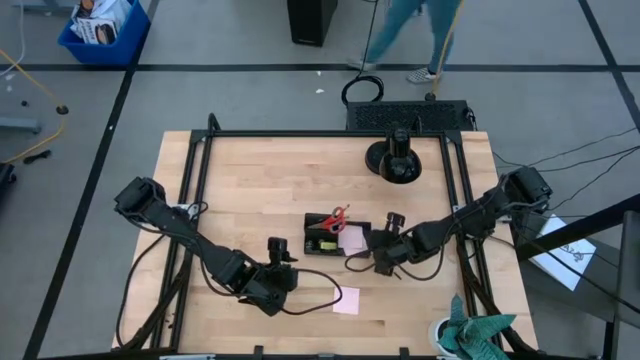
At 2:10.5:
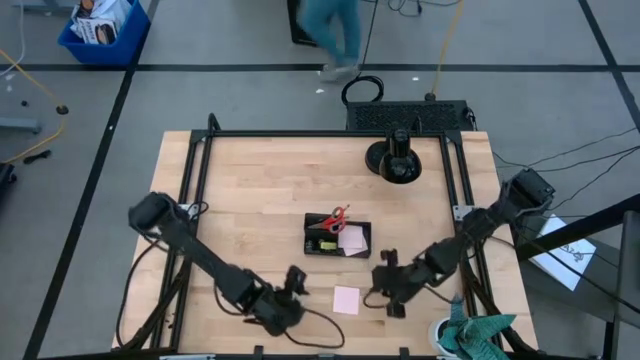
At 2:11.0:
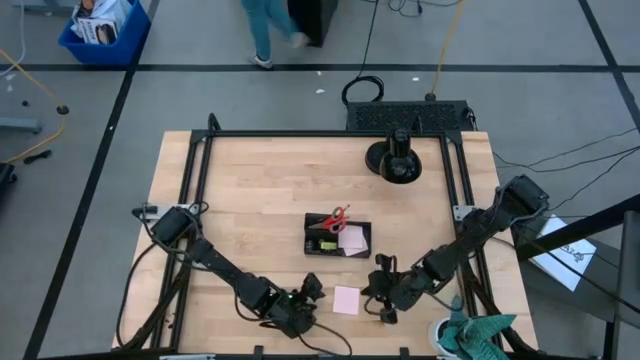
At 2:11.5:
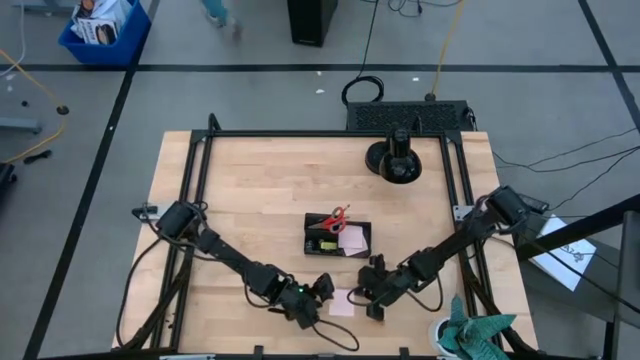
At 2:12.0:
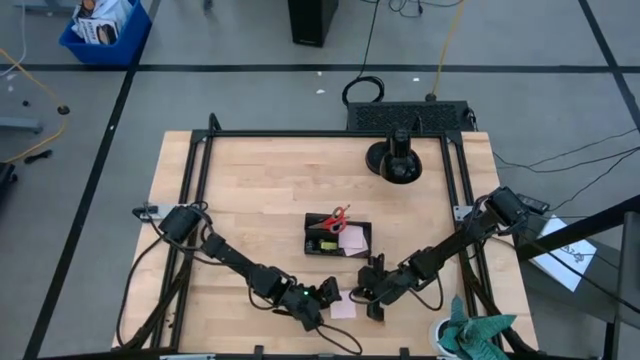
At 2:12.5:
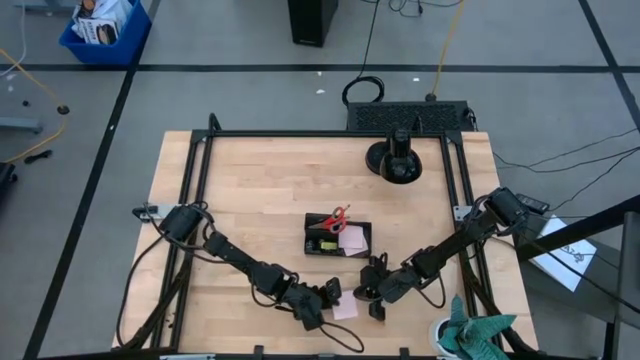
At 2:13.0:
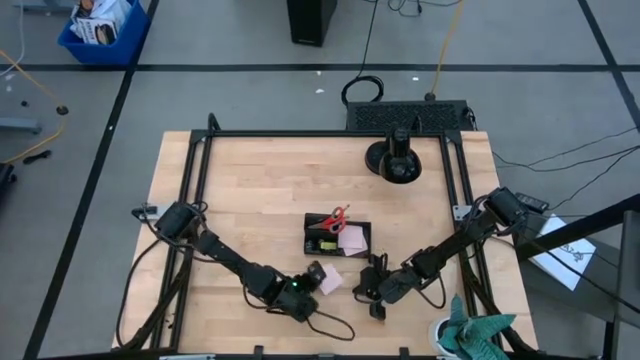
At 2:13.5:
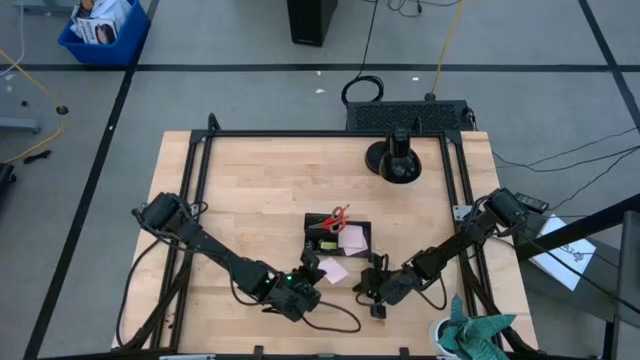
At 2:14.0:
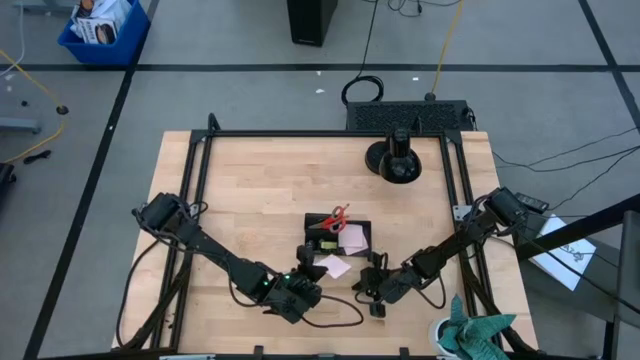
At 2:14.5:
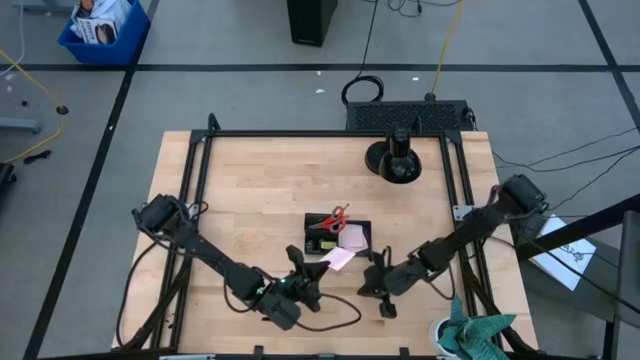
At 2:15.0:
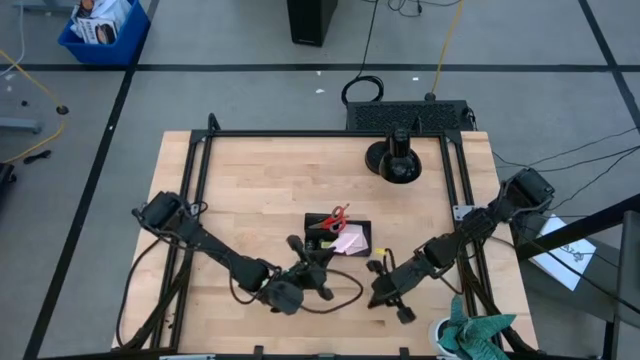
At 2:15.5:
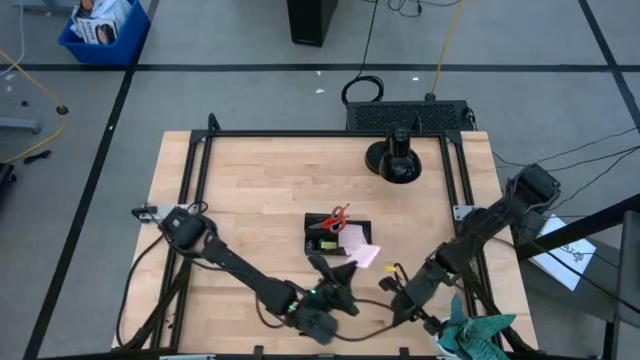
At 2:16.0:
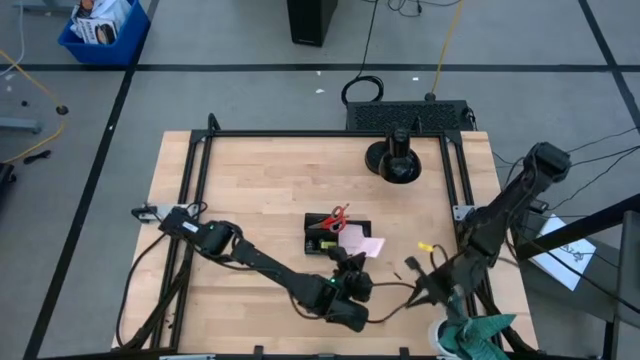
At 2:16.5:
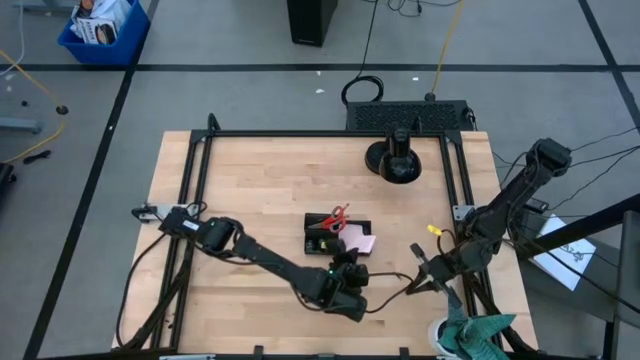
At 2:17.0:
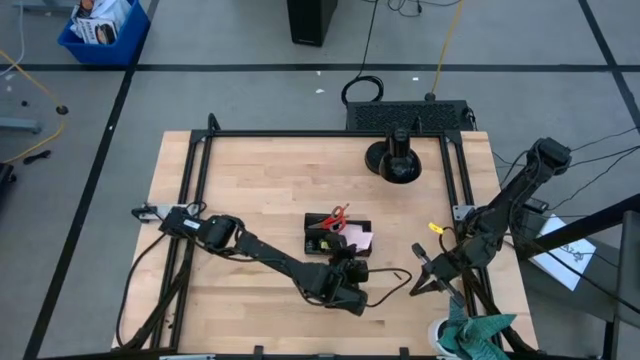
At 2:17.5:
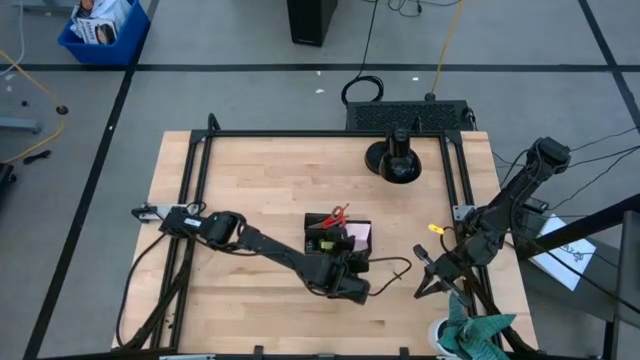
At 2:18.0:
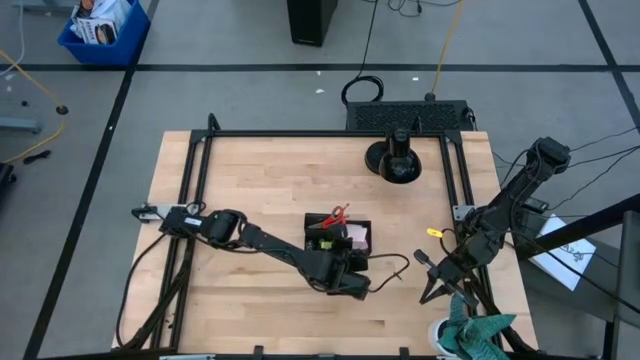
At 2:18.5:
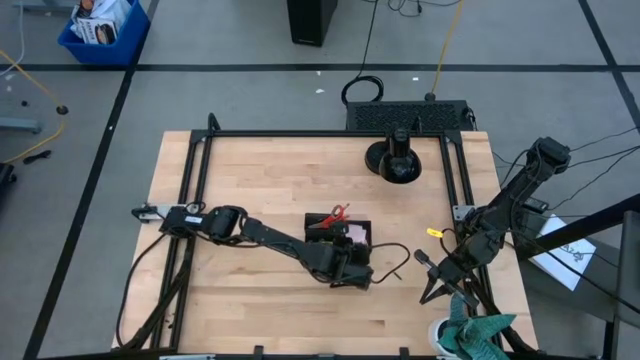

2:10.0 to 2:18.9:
Task: Pick and place office supplies into organizer
Put the pink sticky notes into the black desk organizer

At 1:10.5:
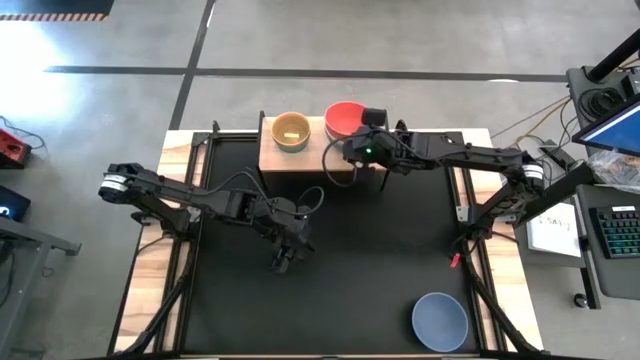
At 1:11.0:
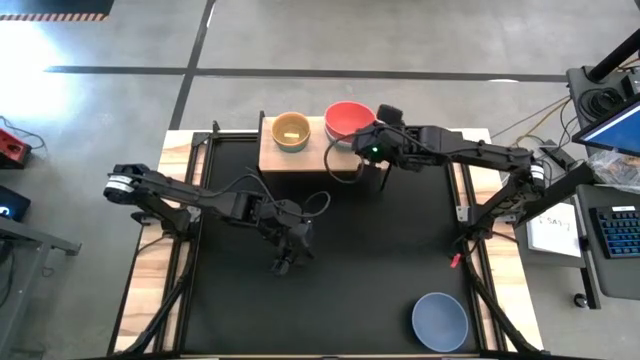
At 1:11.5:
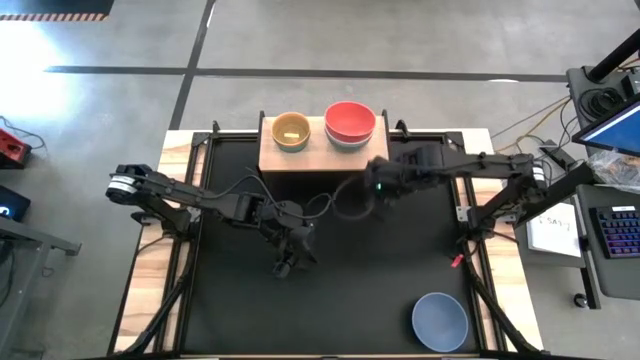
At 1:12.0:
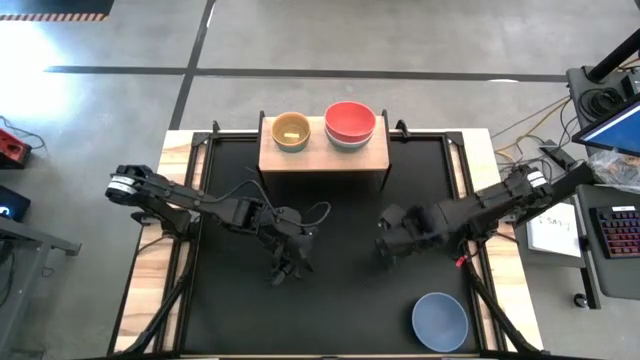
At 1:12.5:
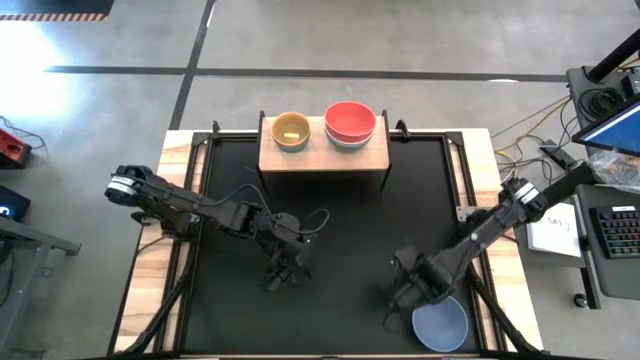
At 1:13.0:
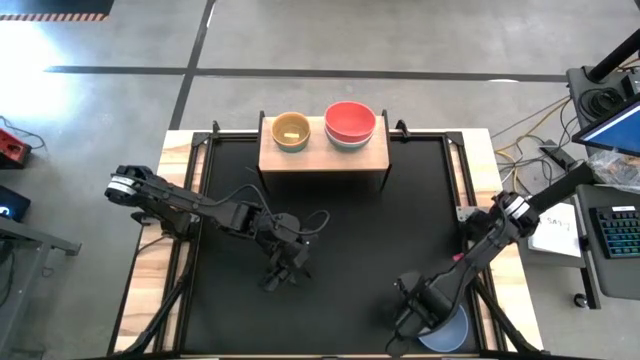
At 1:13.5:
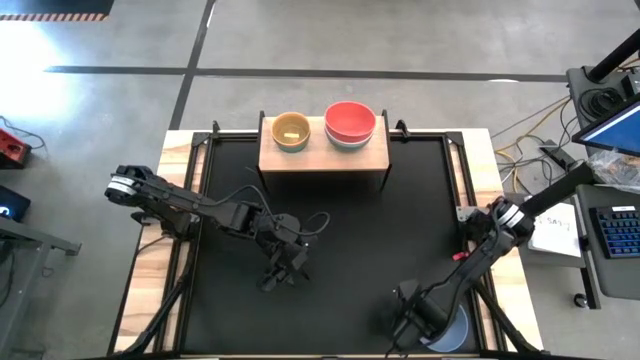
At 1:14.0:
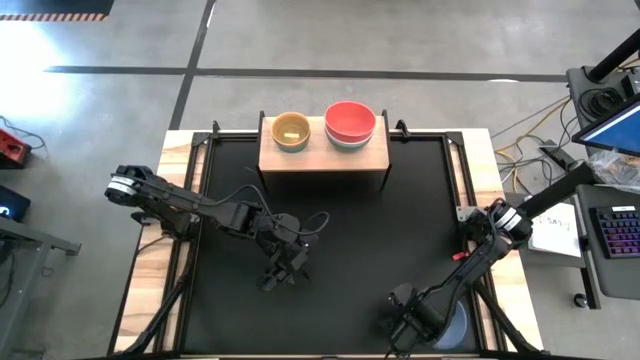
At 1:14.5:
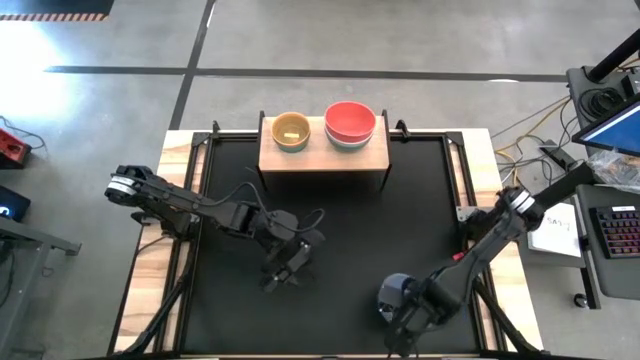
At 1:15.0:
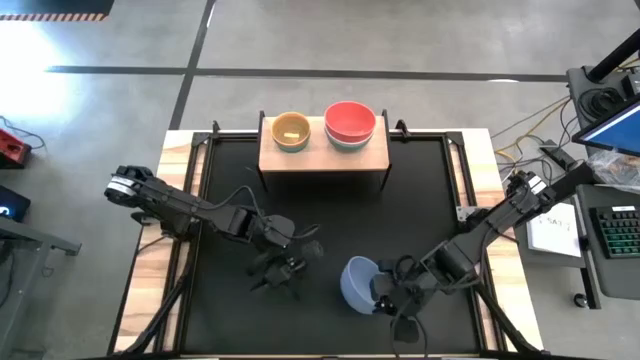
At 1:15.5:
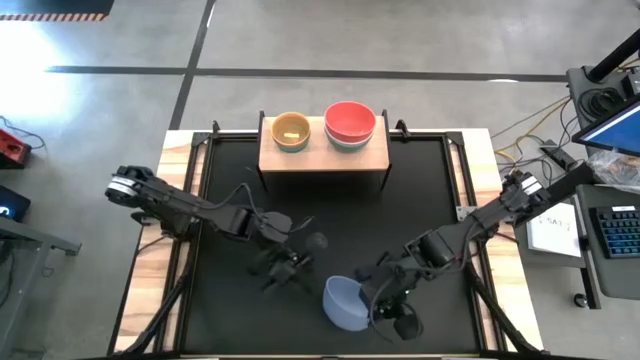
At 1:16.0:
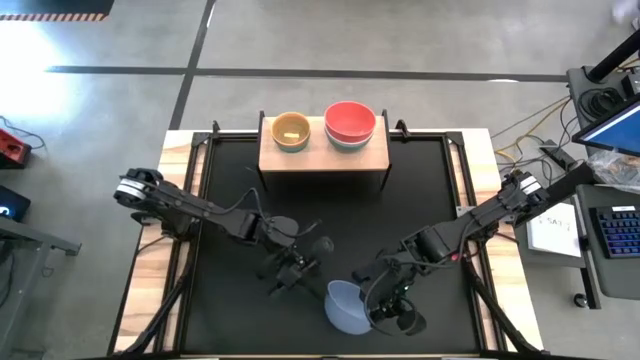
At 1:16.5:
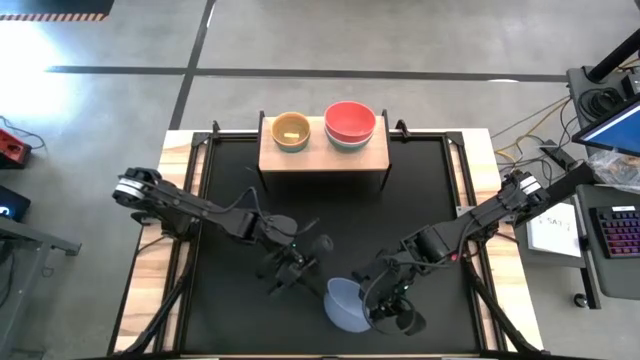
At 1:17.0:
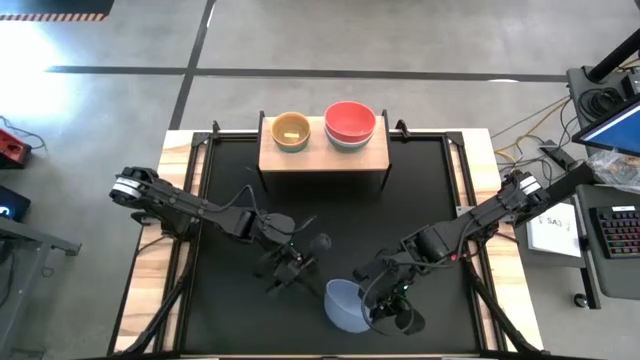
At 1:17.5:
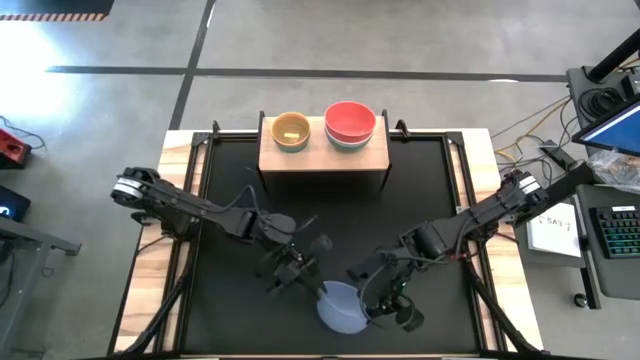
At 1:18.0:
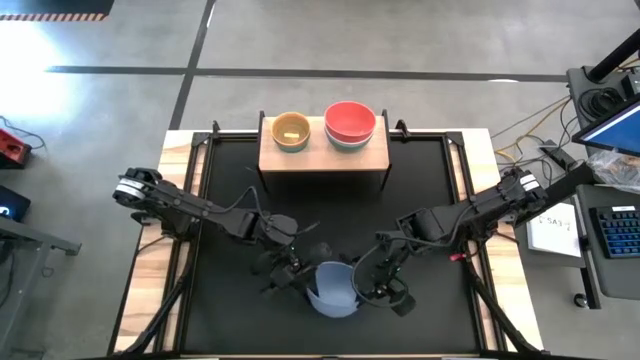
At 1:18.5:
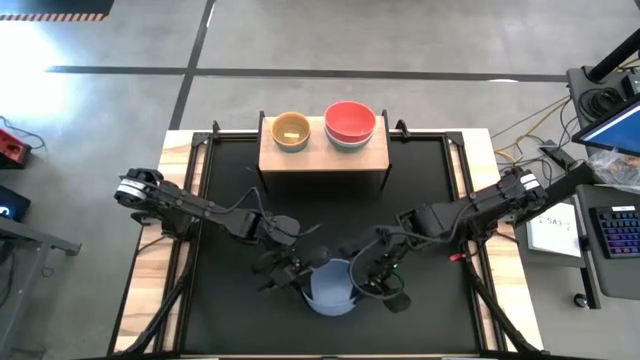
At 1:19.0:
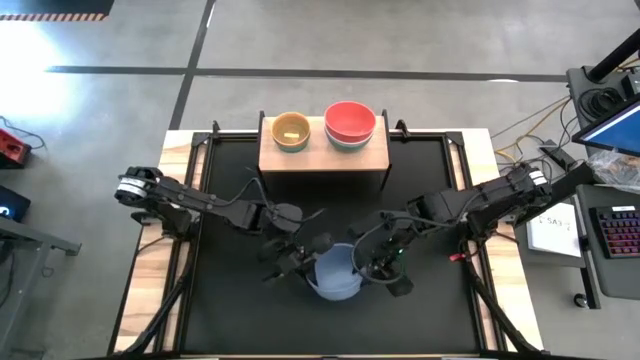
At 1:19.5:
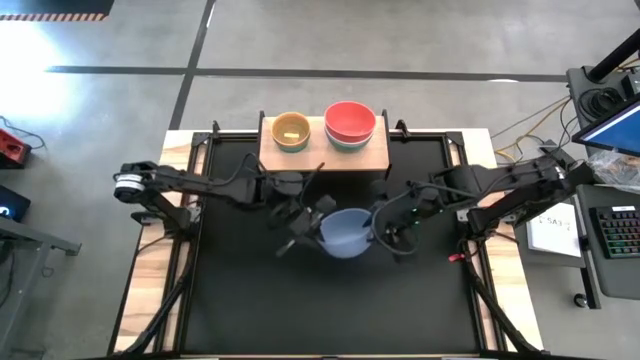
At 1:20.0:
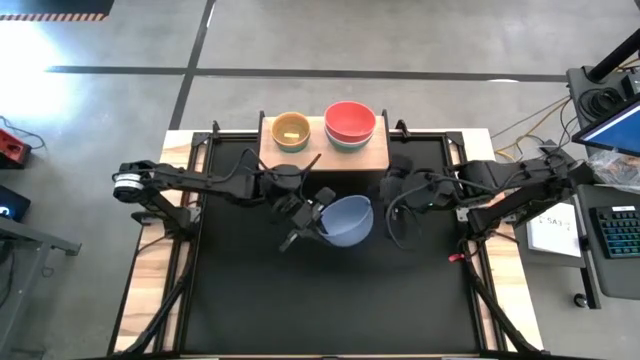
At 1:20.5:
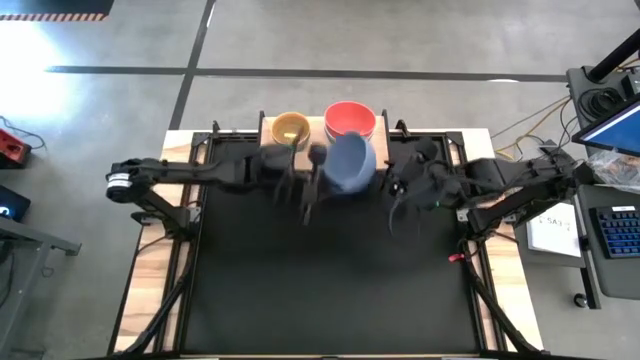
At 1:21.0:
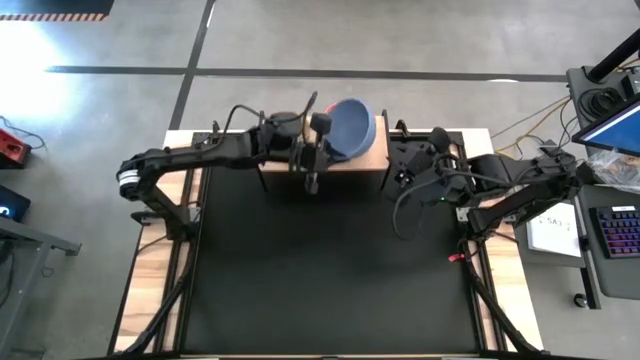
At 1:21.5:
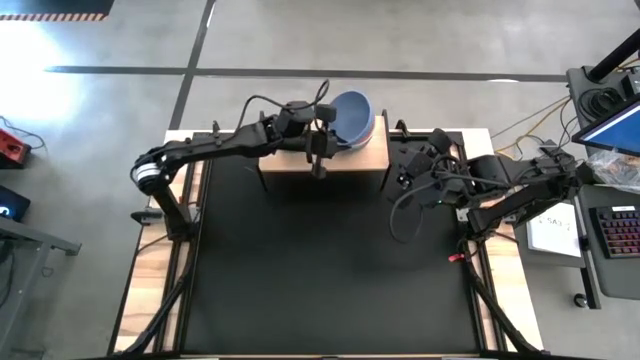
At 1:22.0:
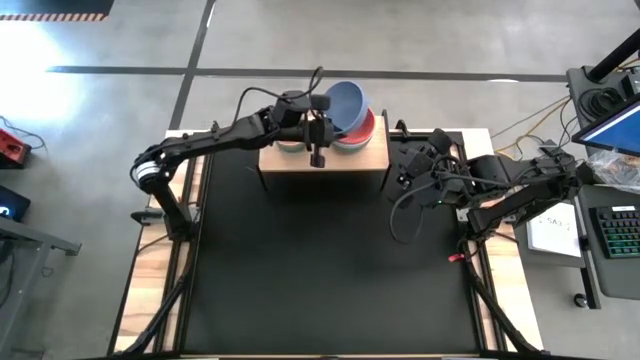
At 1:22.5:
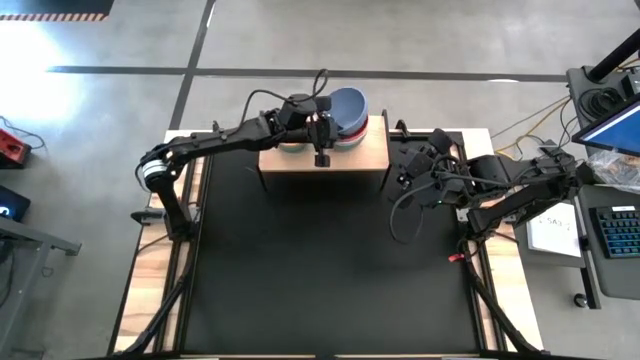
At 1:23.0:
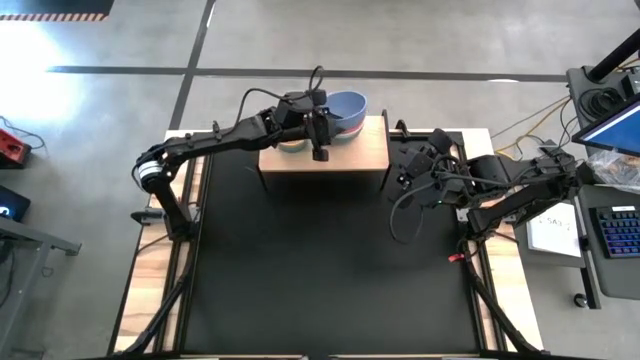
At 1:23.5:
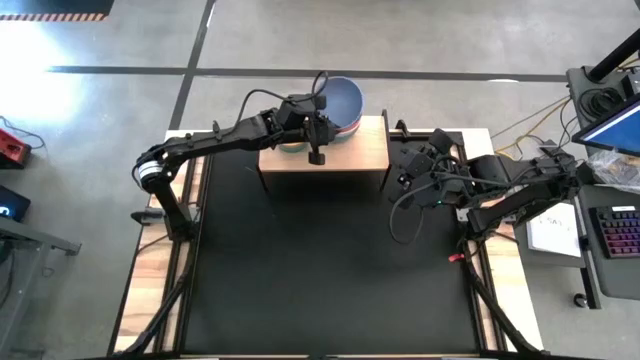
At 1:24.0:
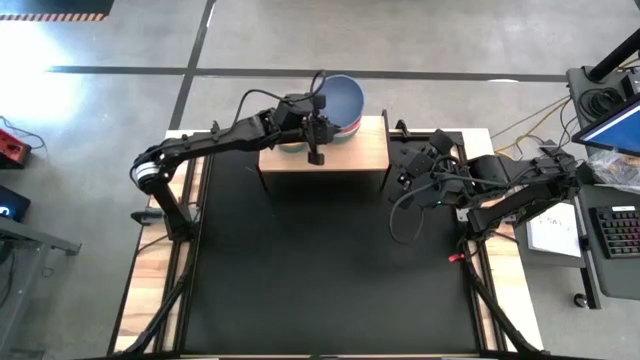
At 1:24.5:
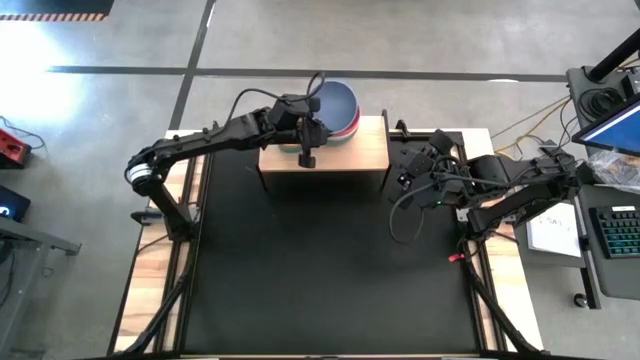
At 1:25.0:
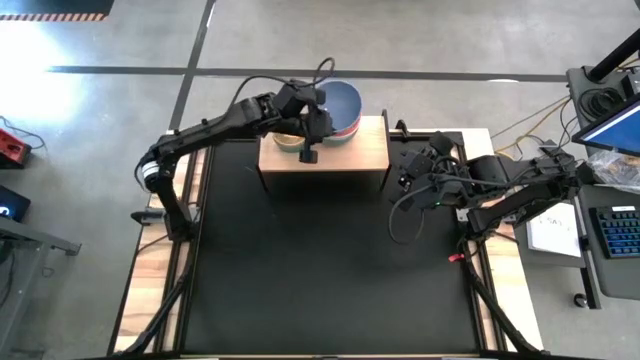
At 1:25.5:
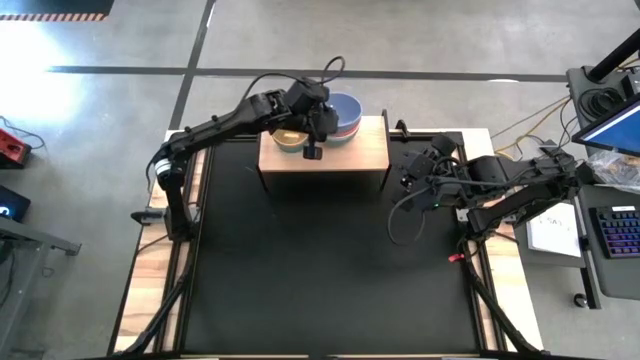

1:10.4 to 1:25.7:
Task: Place and stack bowls onto a shelf
Stack the large blue bowl on top of the large orange bowl on the shelf
